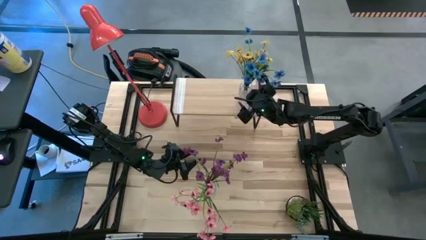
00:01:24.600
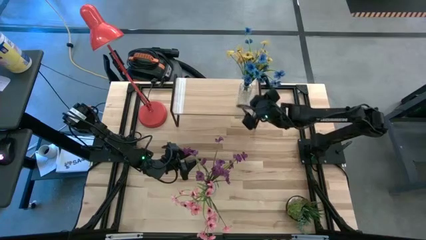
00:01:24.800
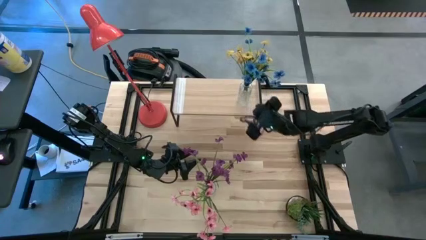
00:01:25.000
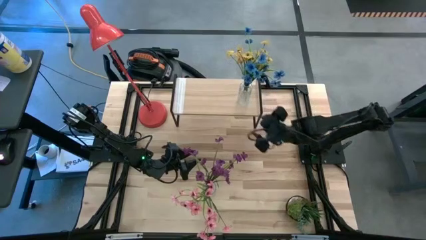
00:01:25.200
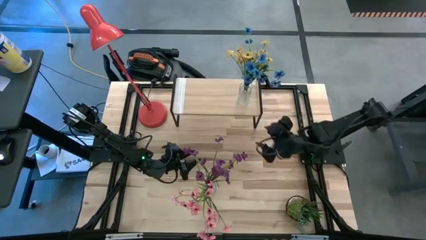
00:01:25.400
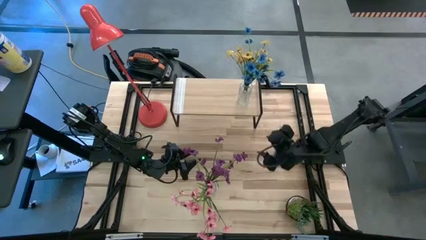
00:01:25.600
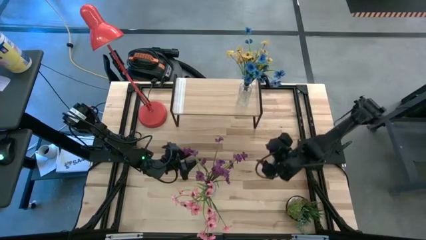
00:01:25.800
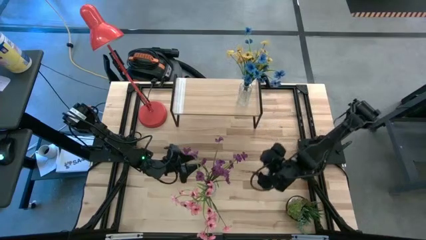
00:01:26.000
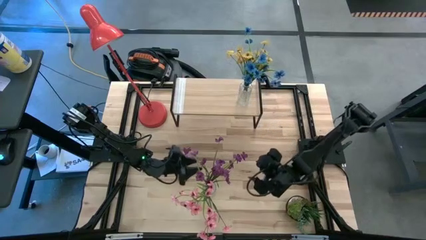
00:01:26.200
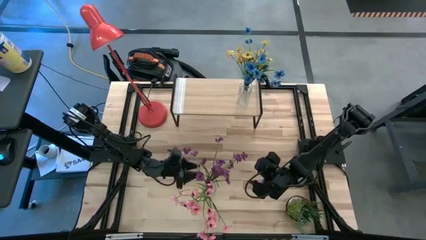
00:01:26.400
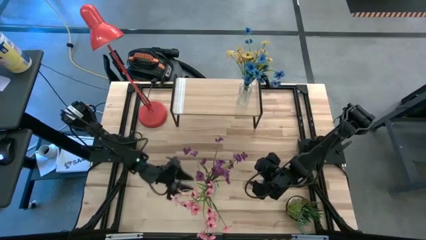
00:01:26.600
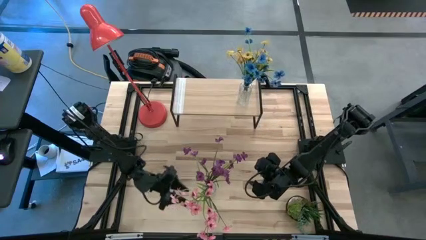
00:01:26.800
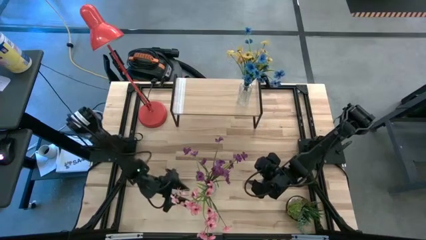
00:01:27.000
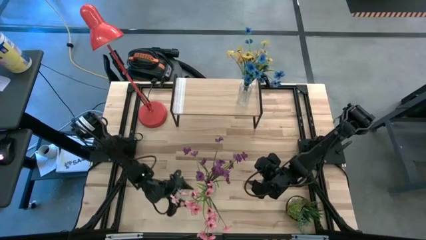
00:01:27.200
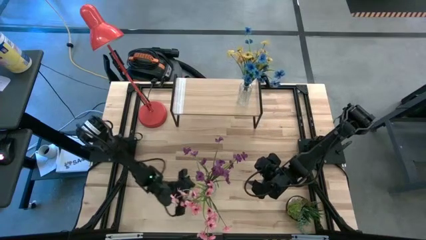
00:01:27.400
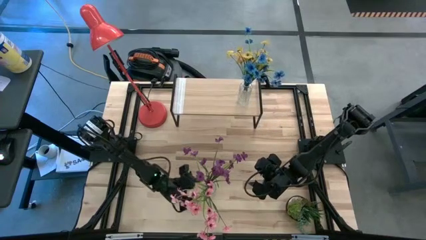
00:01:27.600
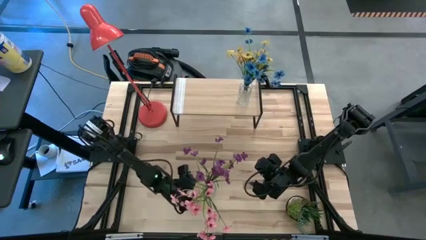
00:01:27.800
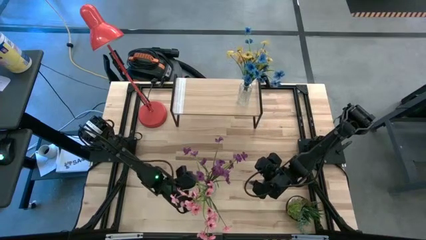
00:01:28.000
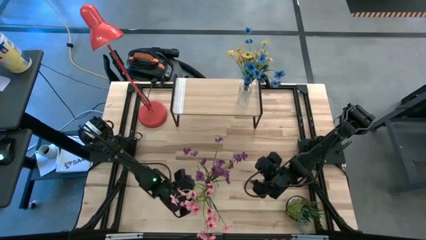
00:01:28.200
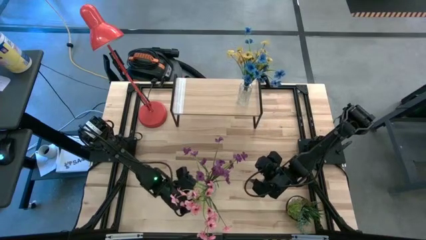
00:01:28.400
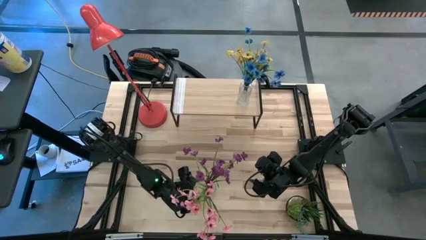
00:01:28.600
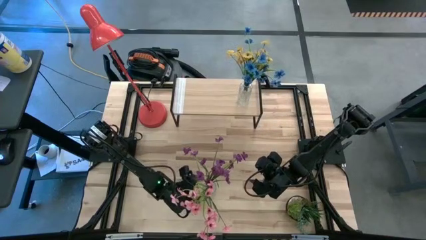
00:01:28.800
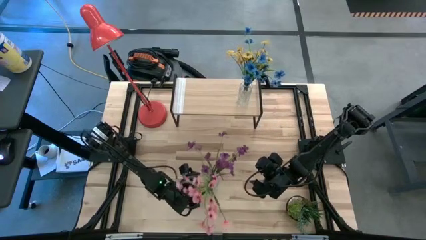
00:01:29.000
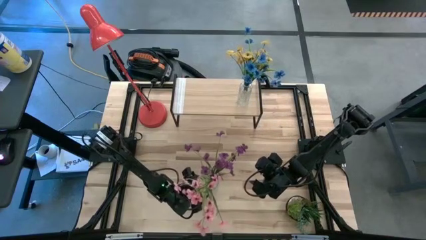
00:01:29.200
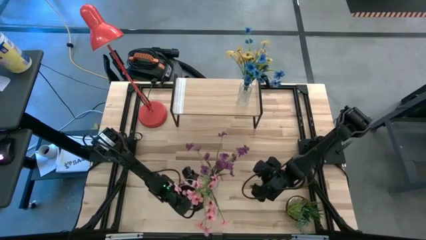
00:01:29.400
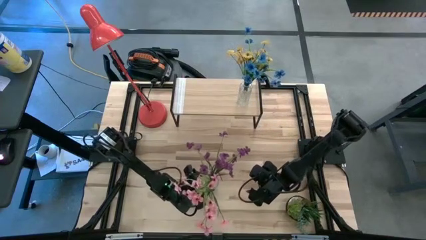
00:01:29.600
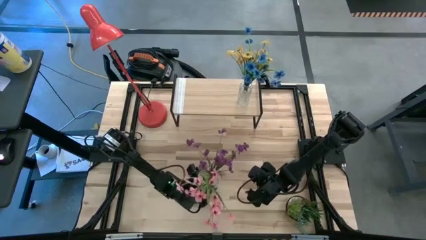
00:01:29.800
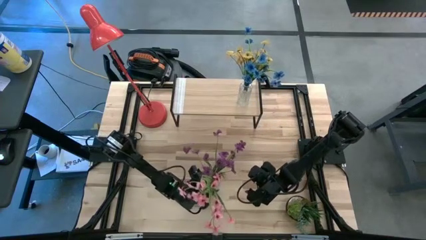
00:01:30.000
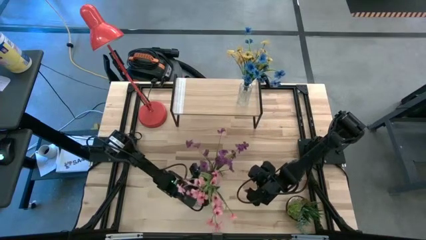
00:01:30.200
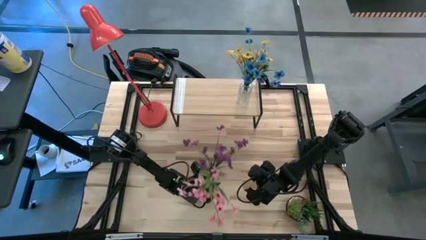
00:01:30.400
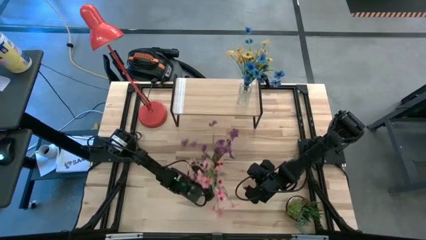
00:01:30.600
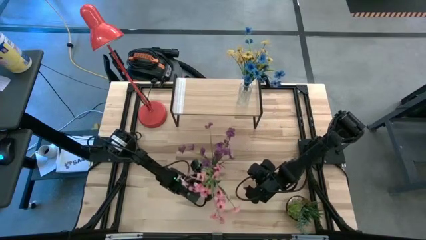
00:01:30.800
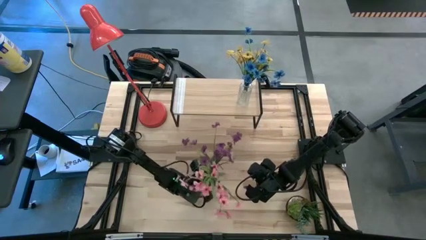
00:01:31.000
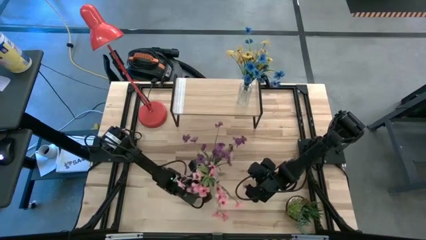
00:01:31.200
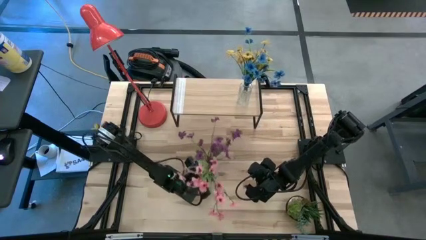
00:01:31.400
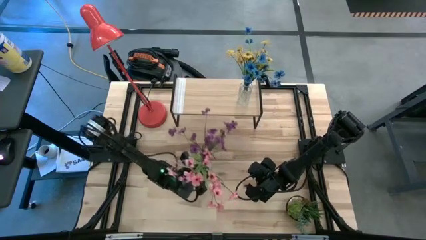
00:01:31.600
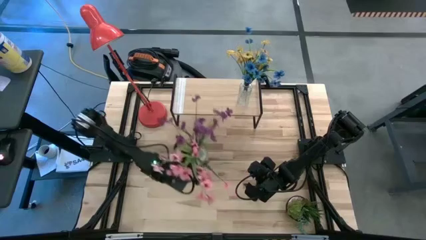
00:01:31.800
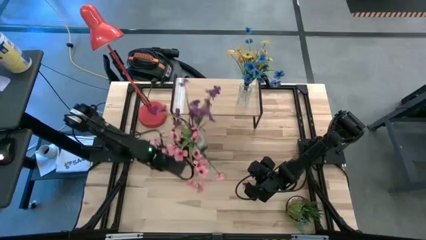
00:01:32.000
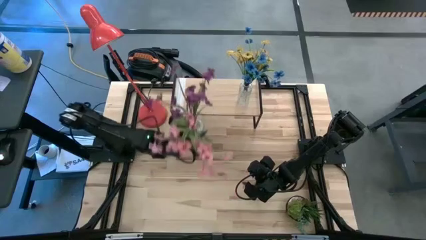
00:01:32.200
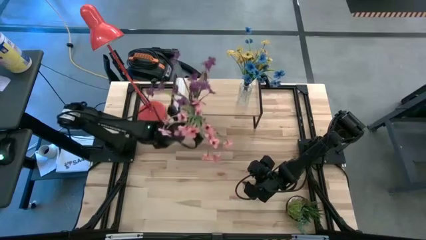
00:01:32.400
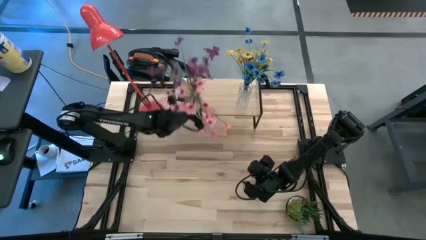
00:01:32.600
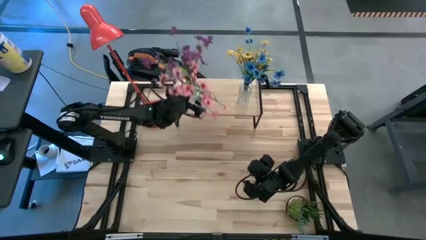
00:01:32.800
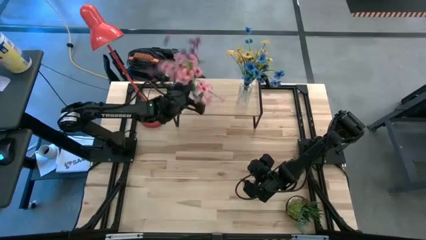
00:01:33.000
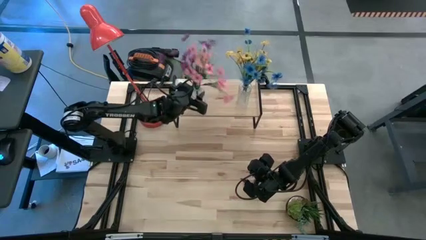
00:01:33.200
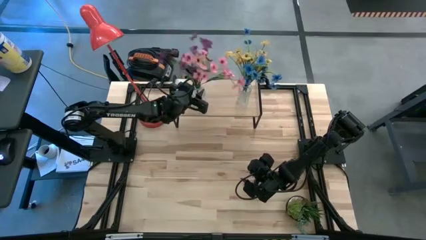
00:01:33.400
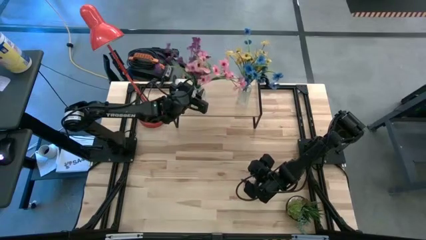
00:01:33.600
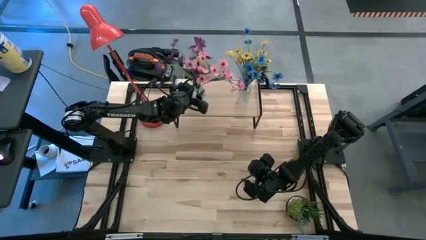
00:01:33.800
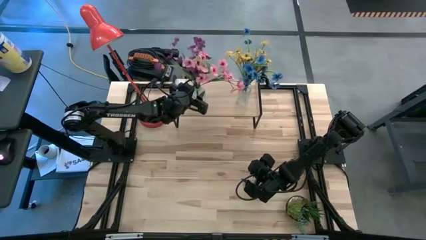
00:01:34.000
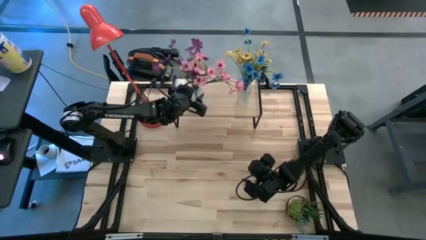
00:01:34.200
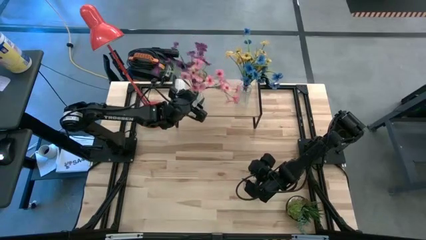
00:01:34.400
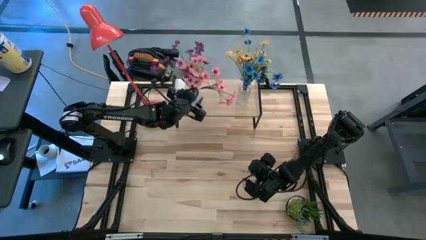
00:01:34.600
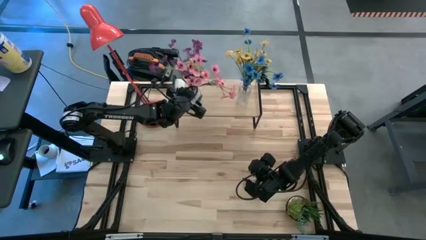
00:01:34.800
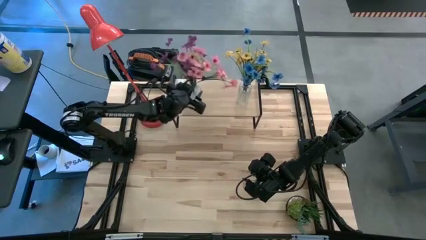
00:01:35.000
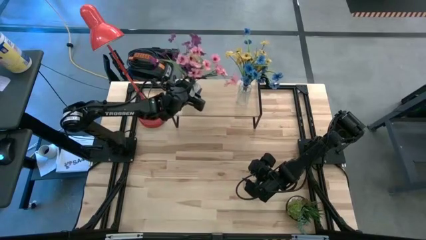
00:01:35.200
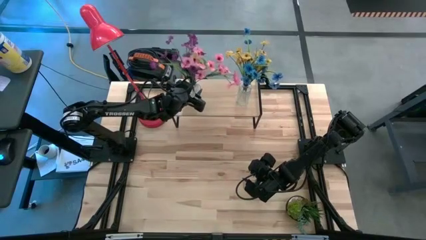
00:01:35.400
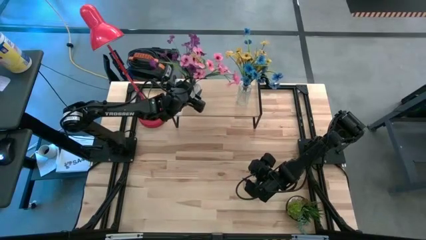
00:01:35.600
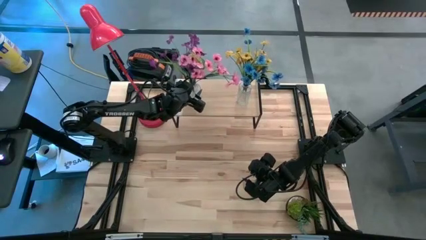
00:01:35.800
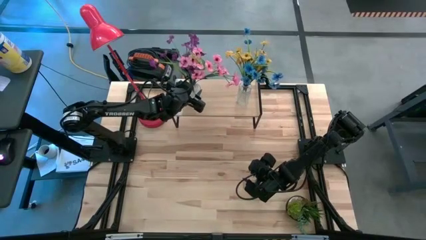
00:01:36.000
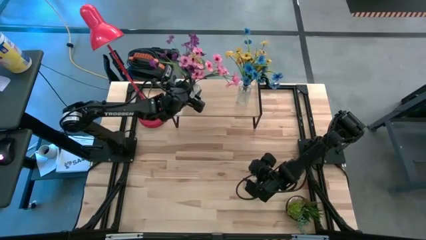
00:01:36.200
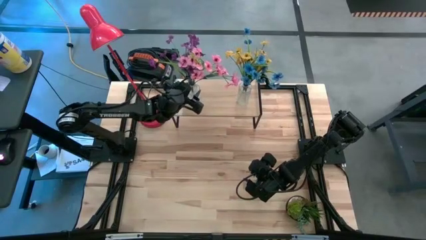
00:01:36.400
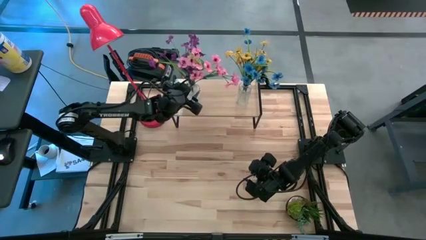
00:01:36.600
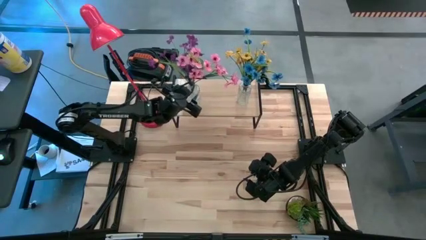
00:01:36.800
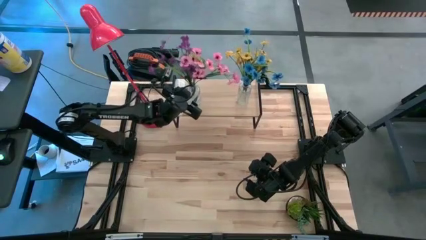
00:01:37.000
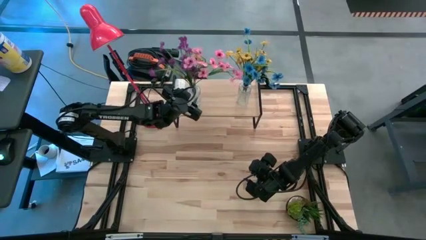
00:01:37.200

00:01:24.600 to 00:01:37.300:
Task: Pick and place flowers into a vace then onto a shelf
Put the vase on the shelf

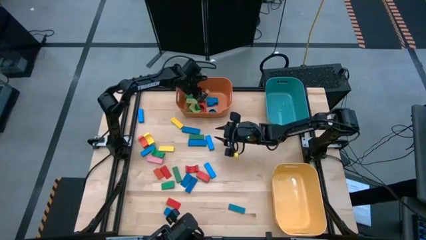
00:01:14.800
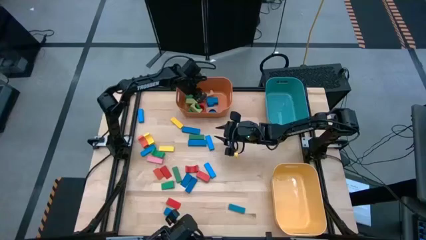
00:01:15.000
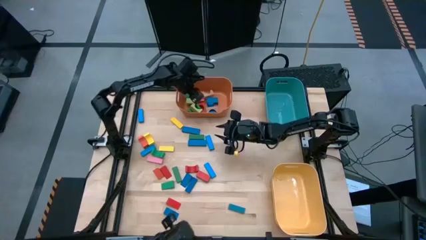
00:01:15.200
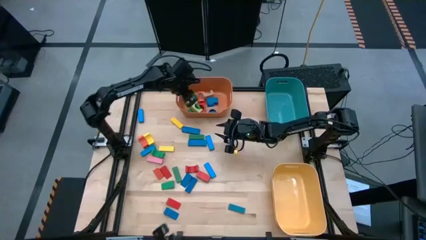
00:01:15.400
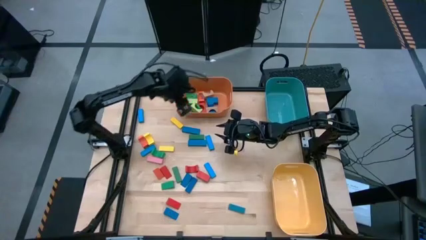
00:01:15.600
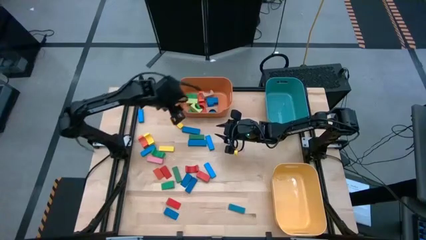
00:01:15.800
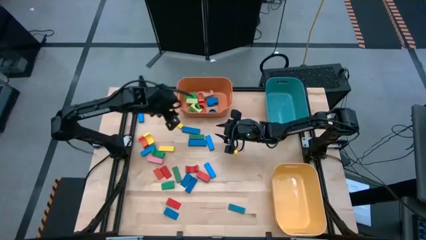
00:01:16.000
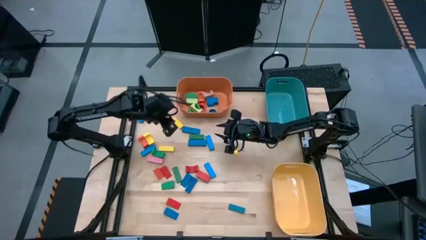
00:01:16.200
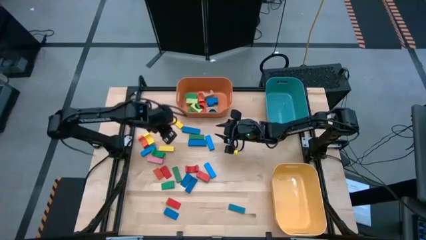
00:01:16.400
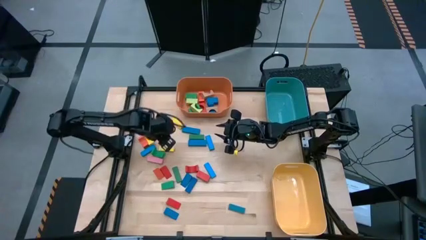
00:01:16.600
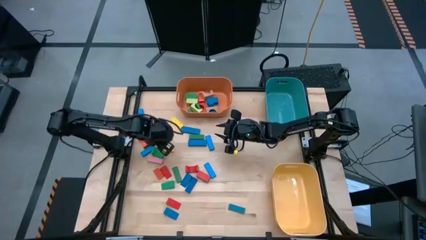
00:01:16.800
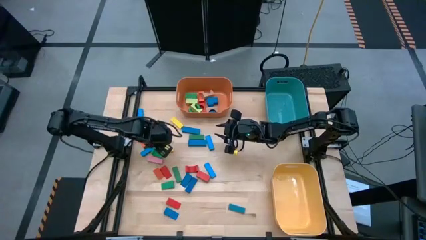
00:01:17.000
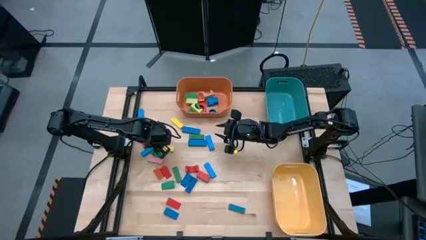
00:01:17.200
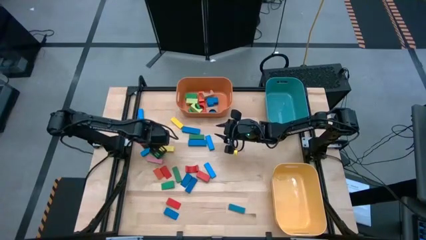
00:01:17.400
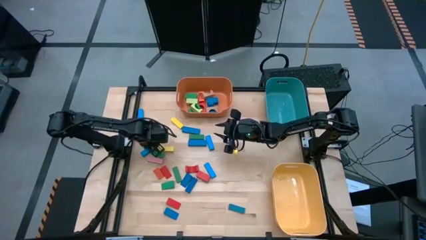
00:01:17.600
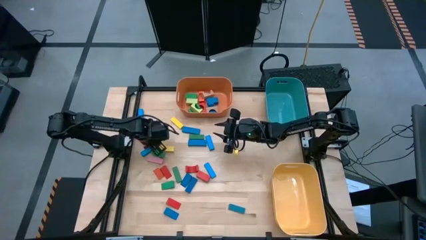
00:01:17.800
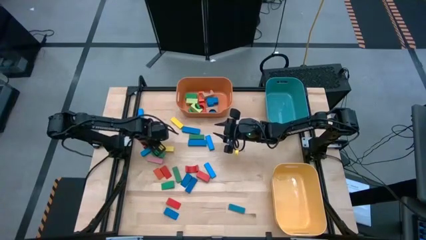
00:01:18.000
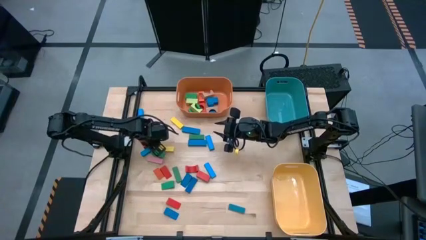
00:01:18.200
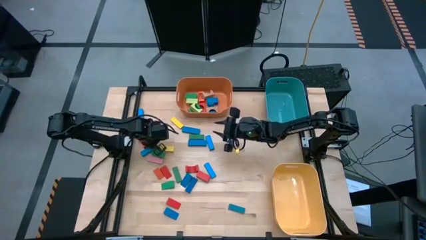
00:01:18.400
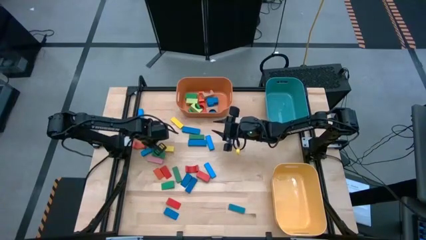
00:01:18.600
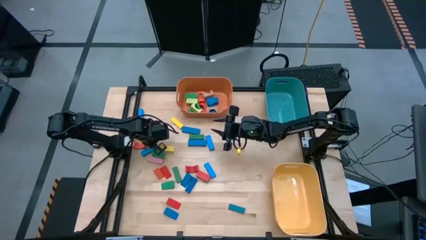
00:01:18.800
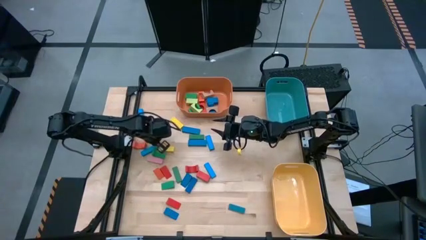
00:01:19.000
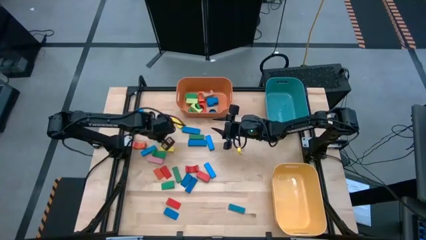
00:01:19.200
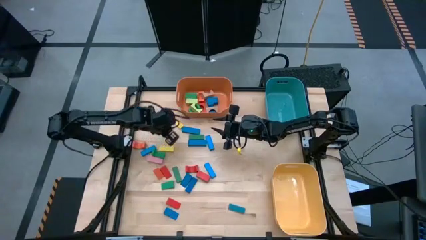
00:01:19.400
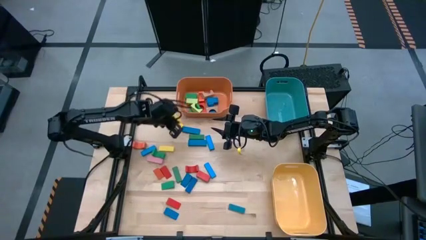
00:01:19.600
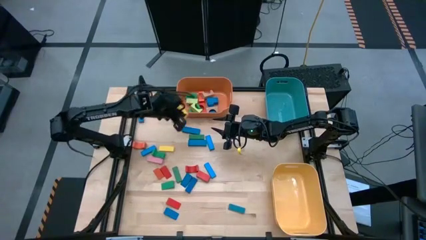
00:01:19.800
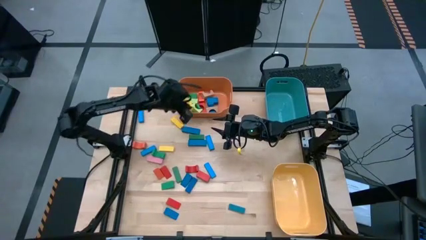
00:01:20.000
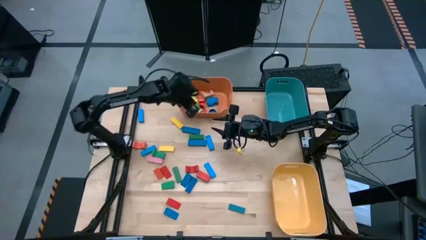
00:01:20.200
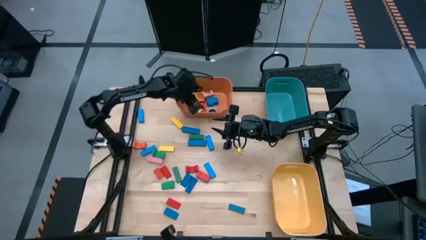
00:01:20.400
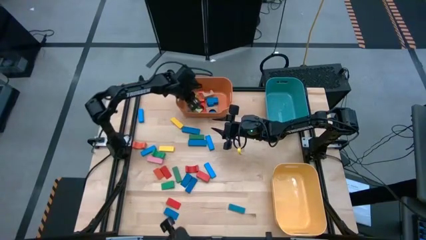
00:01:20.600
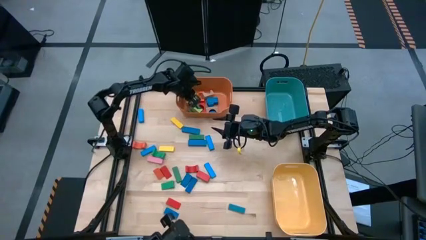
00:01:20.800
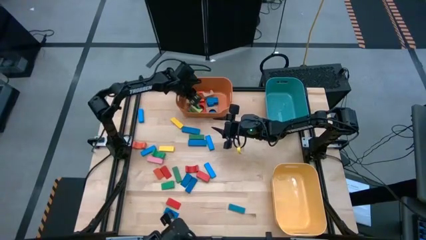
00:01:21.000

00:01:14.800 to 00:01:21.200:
Task: Sort blocks by size
Put the yellow arch block into the orange bin
